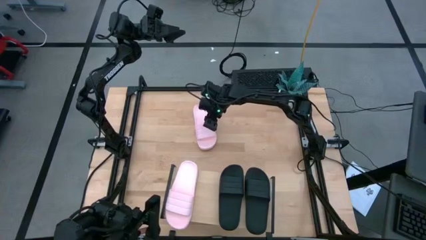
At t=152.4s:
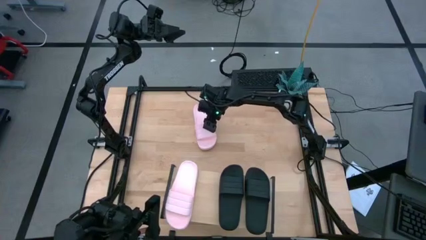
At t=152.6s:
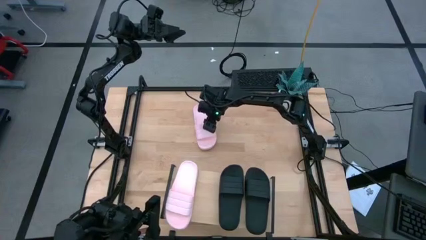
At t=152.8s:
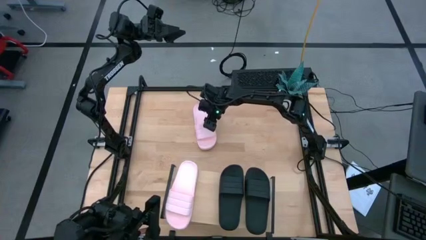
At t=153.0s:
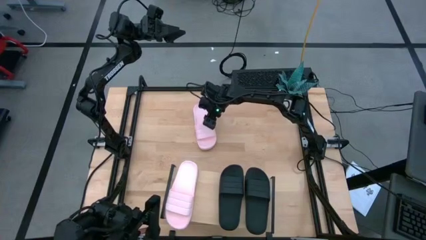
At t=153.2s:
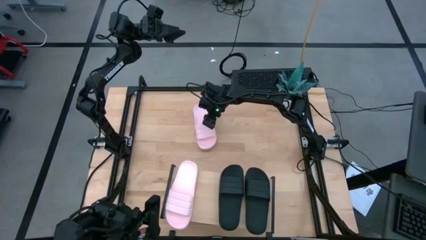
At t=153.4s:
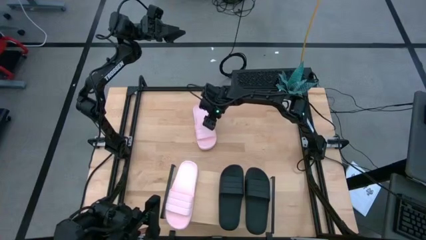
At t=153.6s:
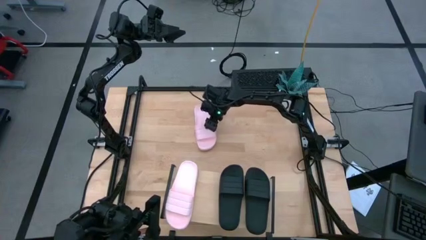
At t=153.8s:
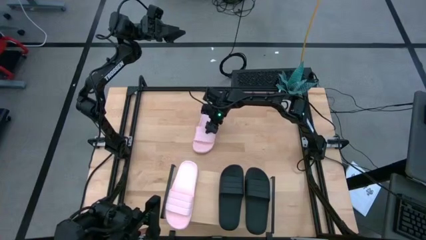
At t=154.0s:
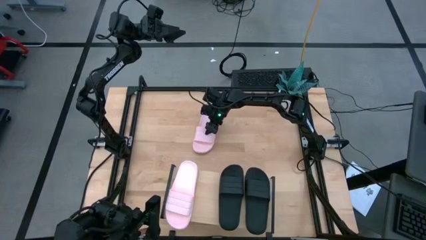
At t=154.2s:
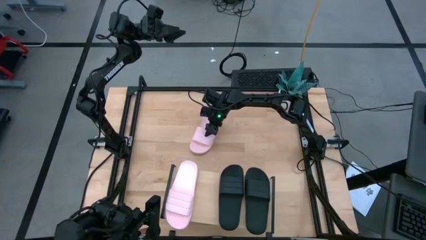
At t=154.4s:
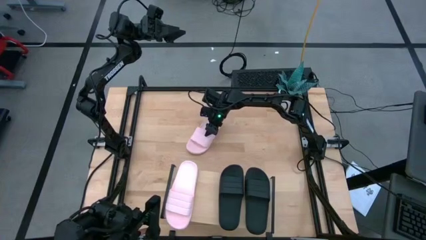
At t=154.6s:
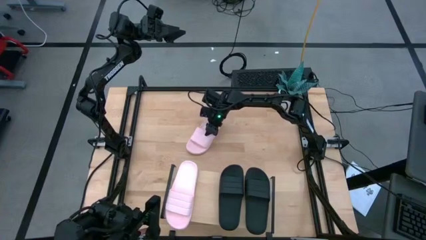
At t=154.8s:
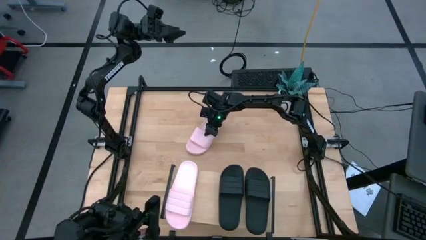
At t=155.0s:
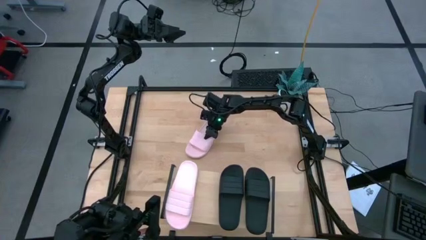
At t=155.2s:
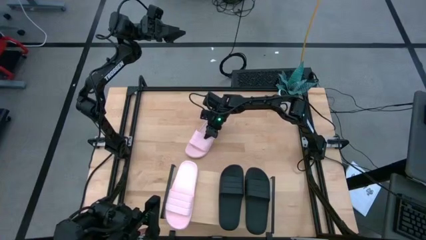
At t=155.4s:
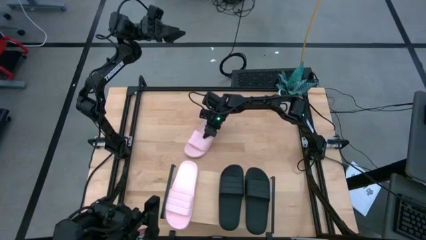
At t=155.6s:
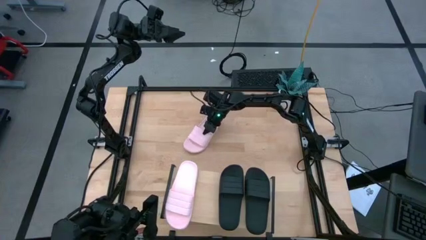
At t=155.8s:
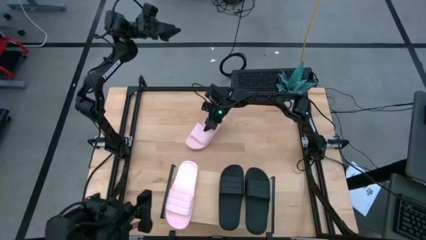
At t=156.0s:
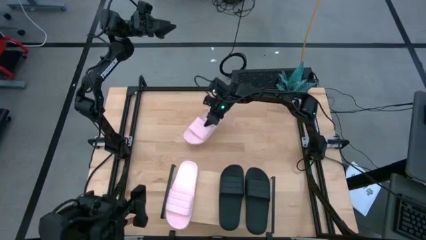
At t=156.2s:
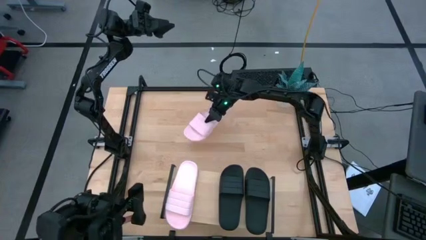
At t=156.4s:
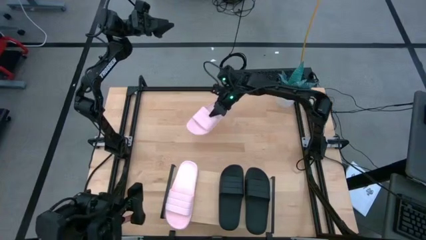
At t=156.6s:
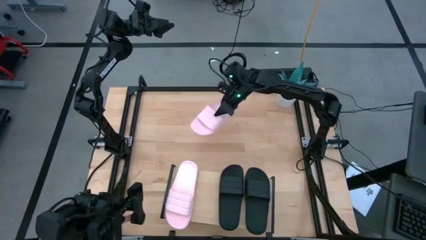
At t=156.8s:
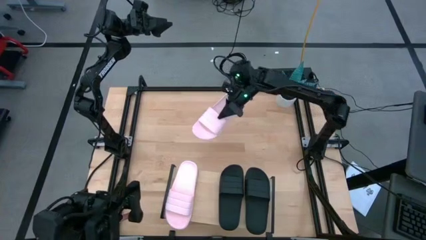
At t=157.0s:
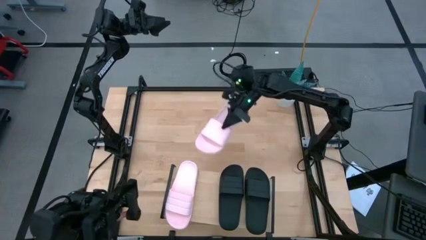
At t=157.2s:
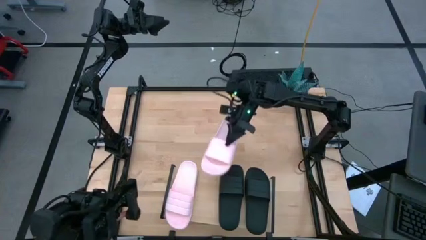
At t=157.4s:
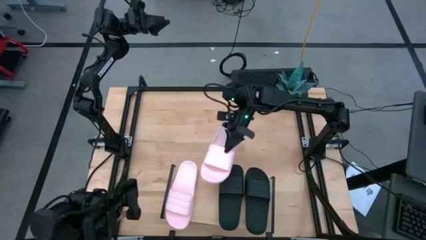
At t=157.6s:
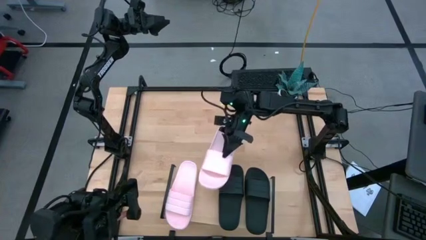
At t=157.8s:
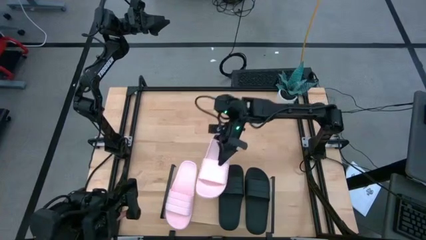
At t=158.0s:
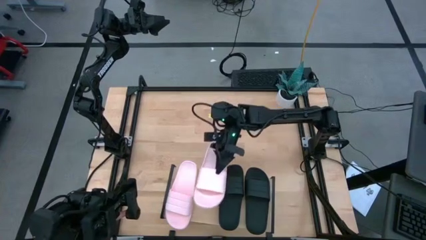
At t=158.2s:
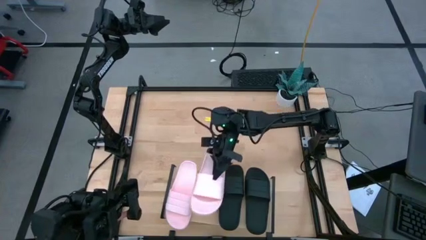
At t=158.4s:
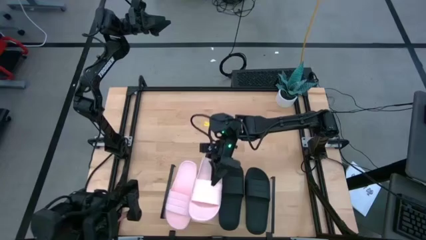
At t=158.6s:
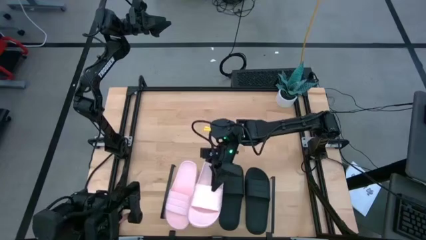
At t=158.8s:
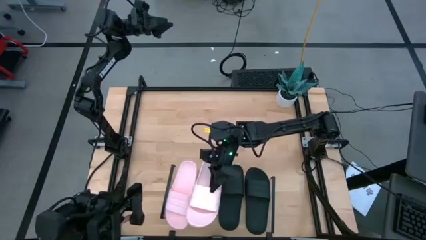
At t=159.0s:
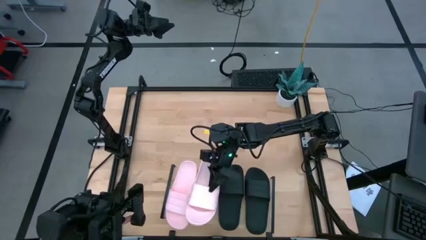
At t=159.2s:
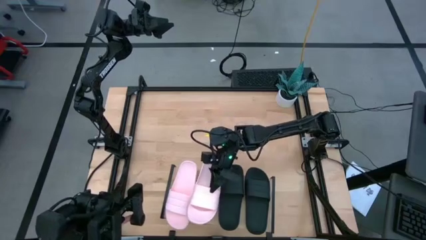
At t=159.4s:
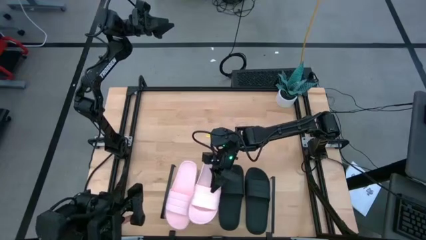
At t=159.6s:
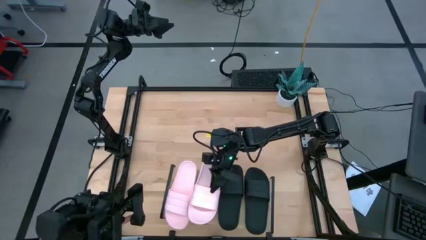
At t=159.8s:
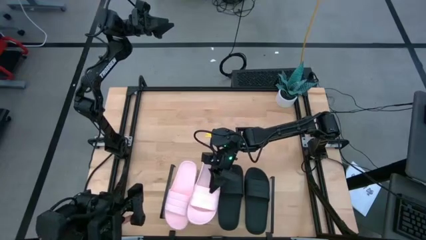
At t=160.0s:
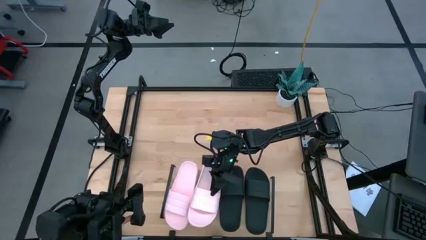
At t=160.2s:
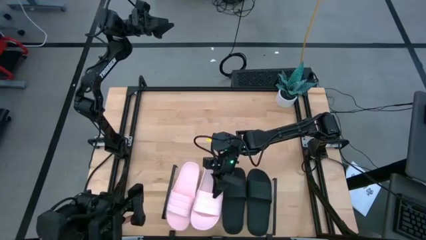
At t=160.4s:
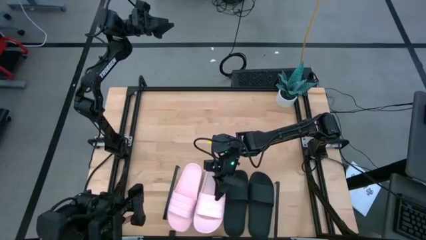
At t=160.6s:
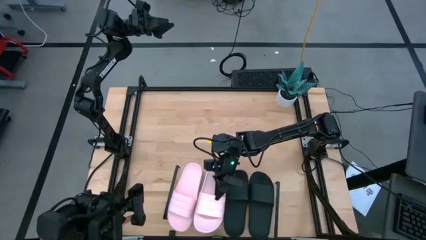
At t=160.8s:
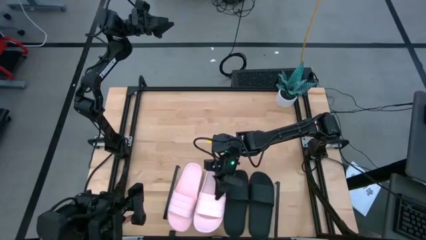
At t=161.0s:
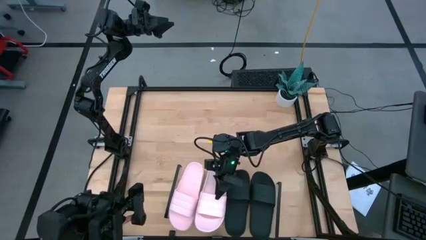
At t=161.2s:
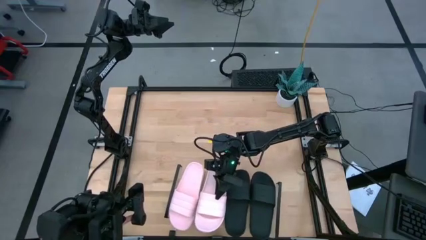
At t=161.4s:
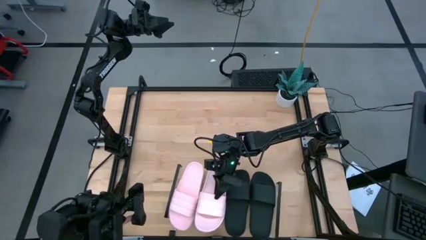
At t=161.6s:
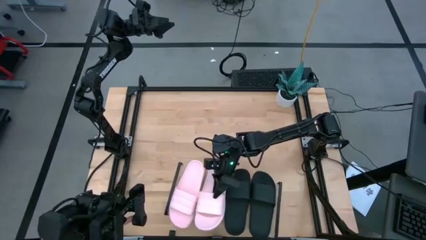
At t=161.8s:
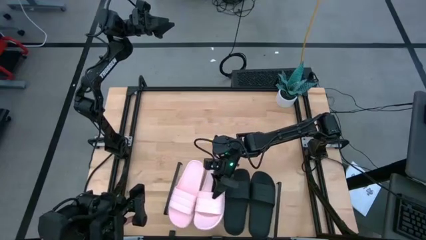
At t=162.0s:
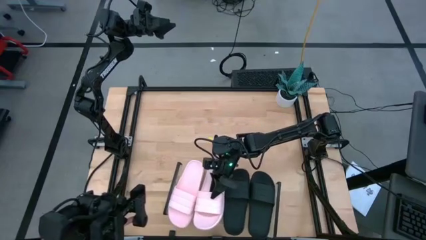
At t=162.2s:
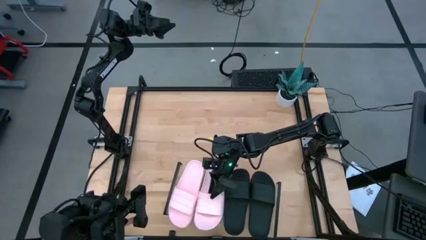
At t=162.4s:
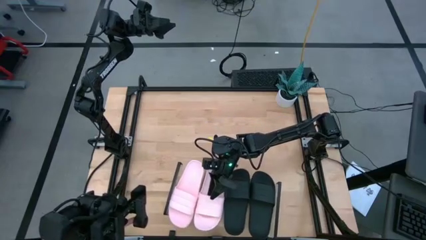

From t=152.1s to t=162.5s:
Task: Pick and place slides into the shelf
Put the pink slipper on the shelf
